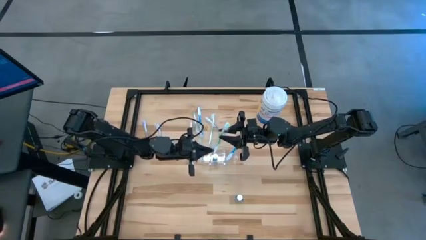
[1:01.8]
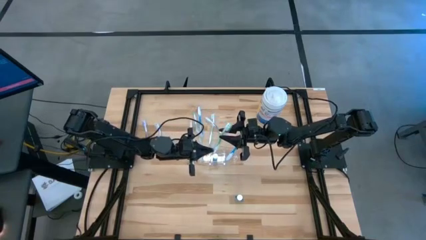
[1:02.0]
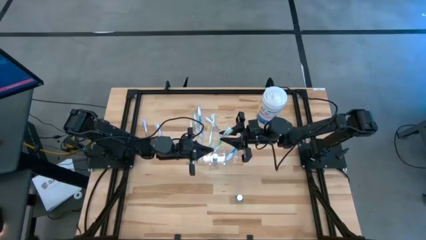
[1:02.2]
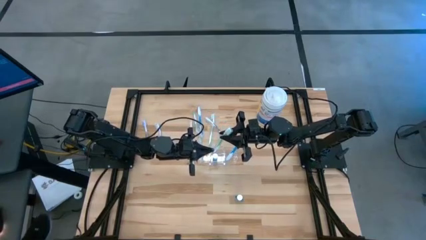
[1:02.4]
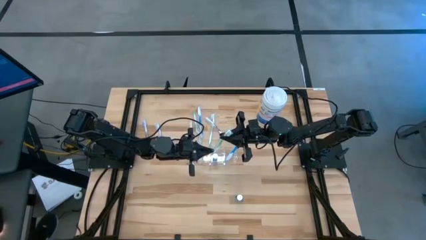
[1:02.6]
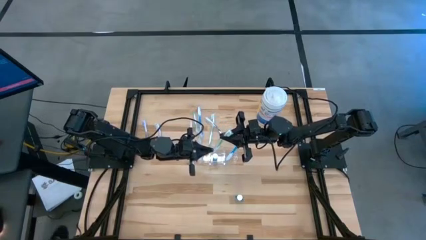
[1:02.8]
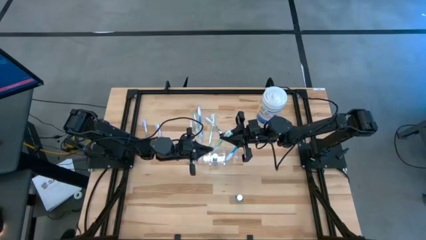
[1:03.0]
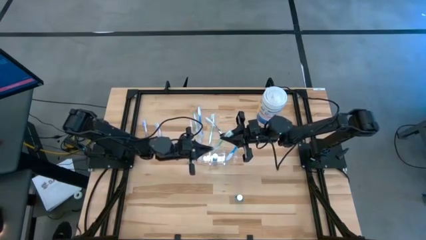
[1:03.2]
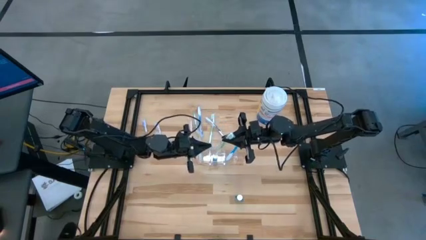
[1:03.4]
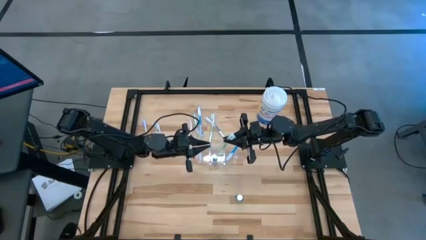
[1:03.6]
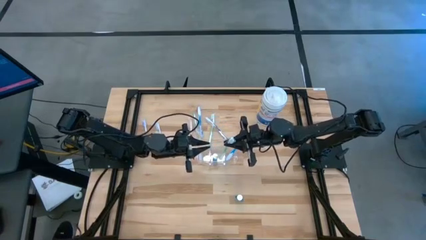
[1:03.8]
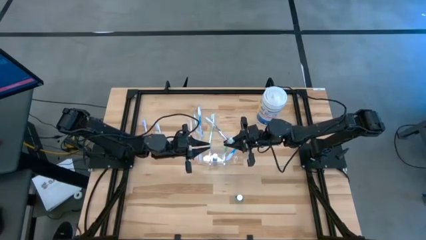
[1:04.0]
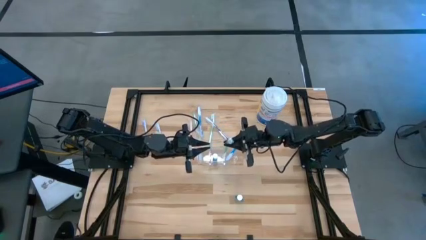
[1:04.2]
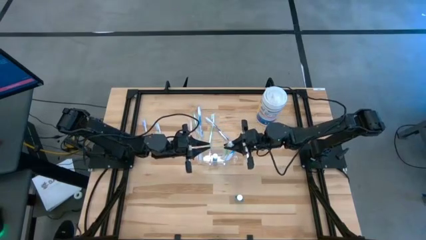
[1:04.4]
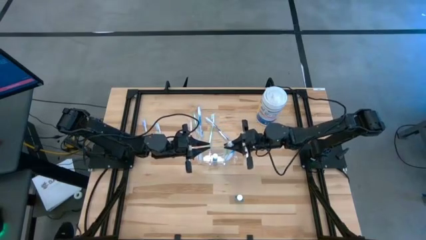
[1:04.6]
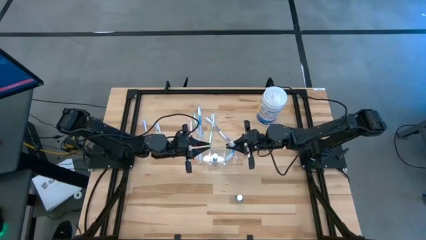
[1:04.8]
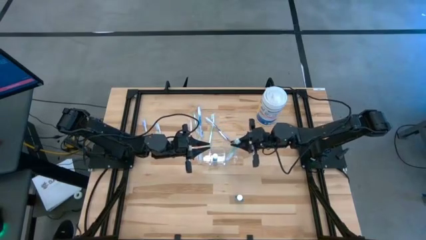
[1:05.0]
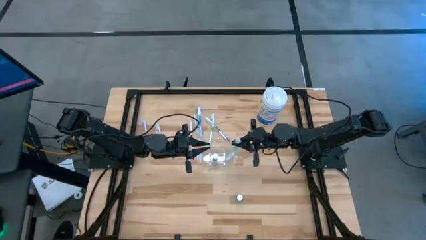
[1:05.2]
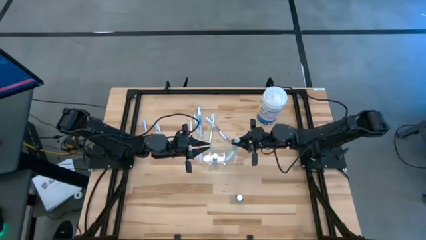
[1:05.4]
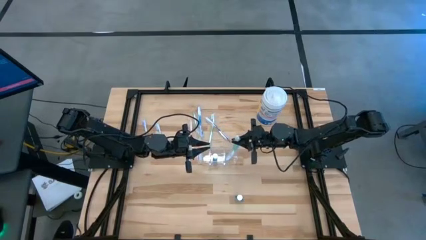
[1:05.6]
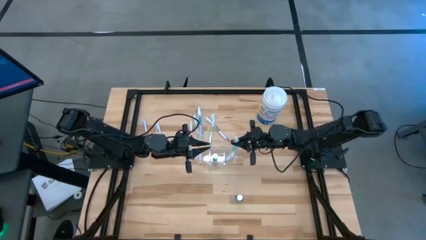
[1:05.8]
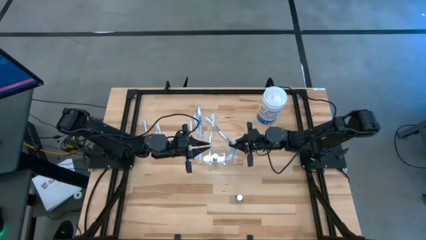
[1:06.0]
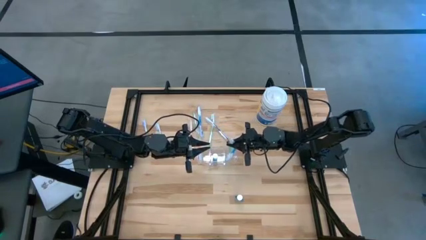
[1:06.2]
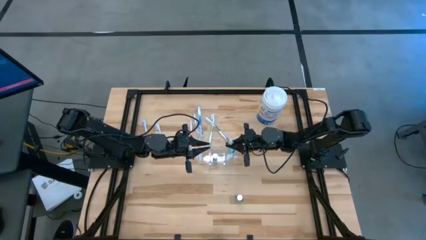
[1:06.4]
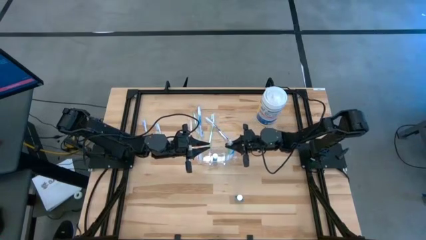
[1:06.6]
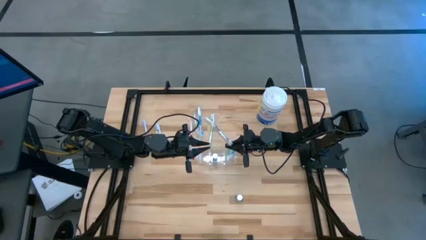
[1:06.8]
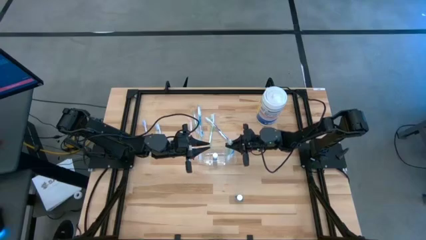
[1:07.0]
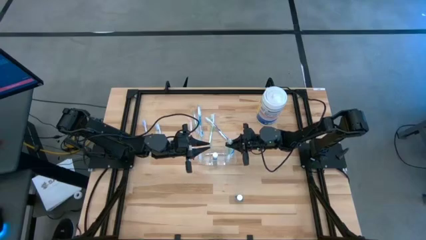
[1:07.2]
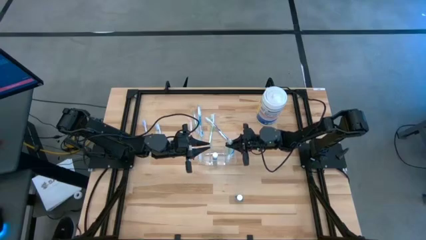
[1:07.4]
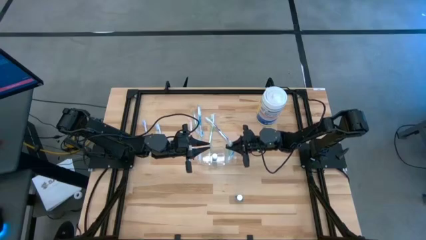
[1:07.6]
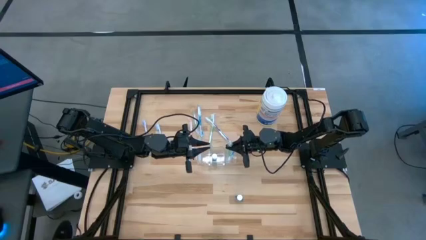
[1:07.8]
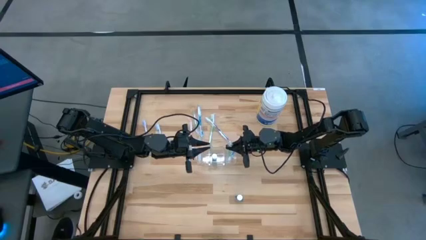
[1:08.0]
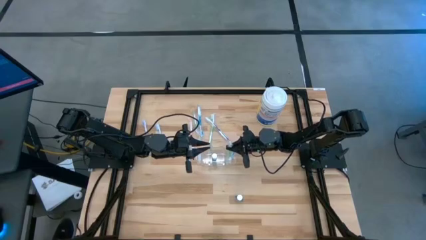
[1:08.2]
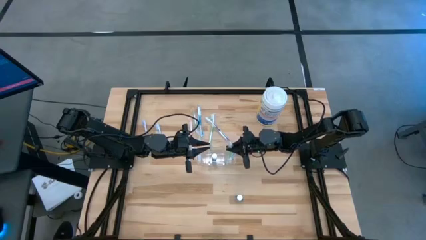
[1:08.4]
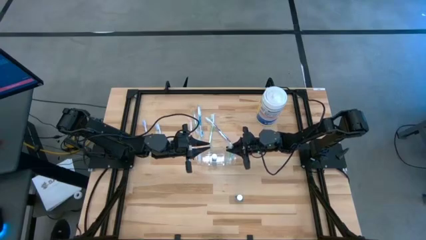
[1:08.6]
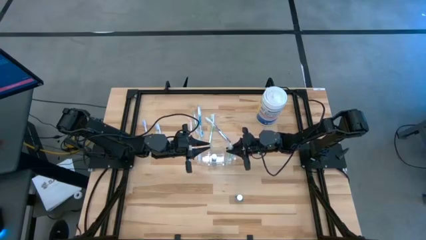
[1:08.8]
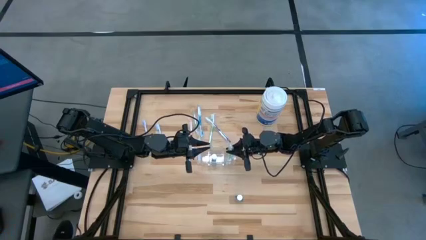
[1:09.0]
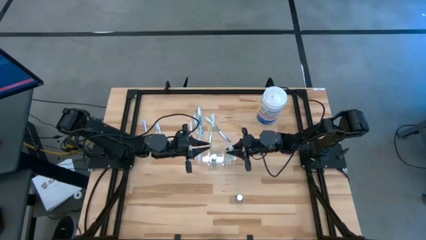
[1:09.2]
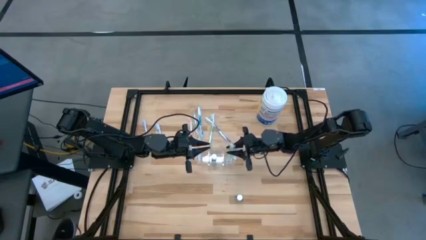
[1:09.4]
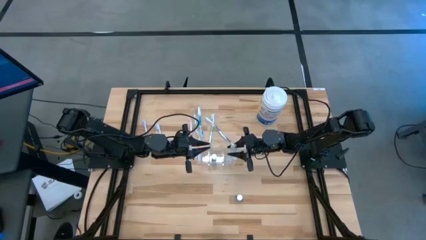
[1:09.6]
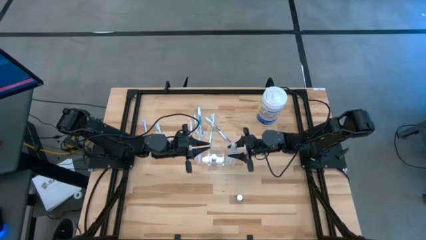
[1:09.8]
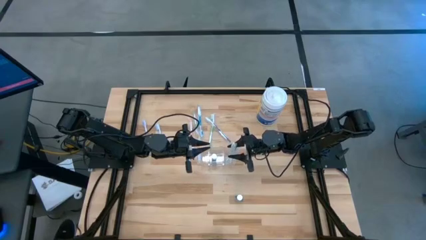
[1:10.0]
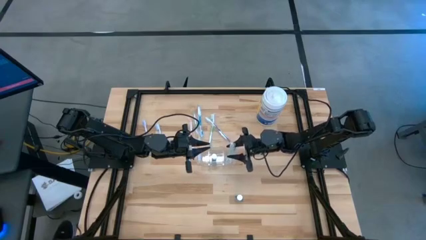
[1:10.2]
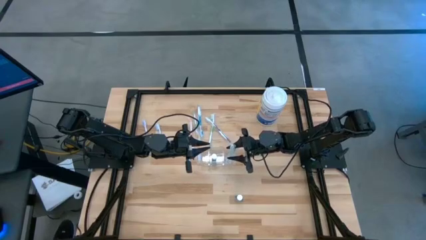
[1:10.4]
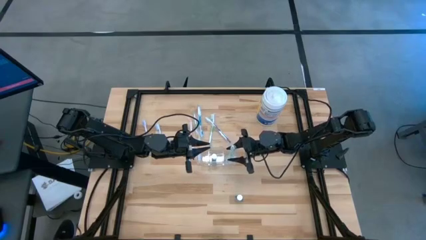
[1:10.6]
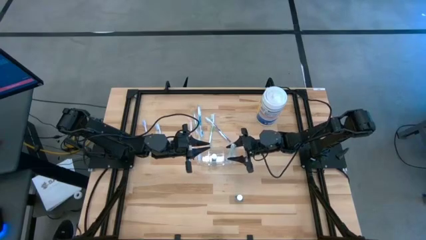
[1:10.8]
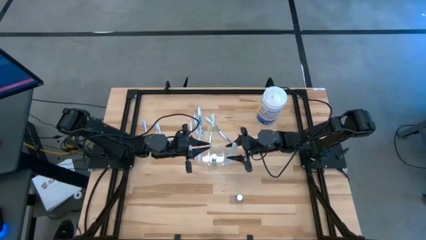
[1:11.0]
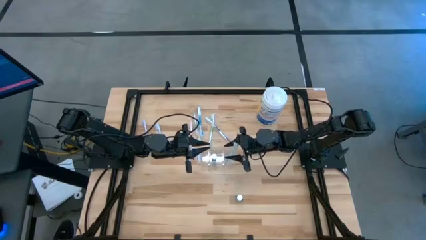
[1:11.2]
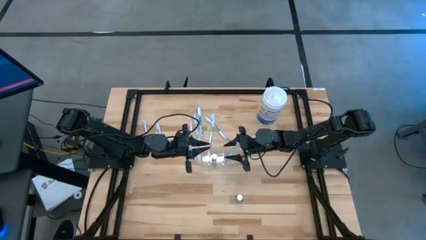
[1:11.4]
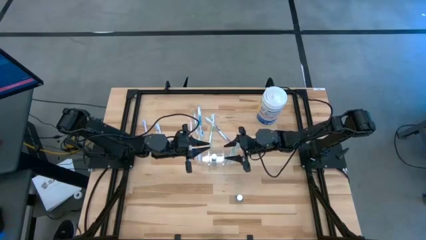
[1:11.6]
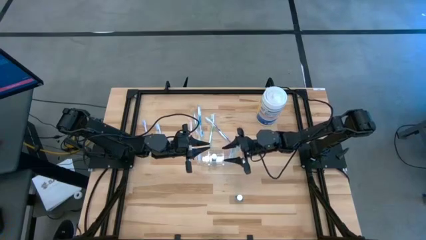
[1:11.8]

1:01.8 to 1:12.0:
Task: Pick & Place toothbrushing station
Put the left green toothbrush into the transparent organizer

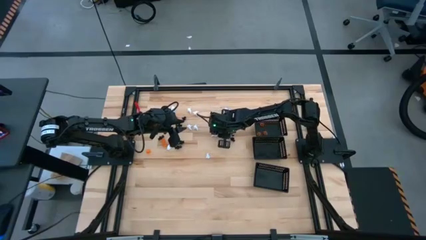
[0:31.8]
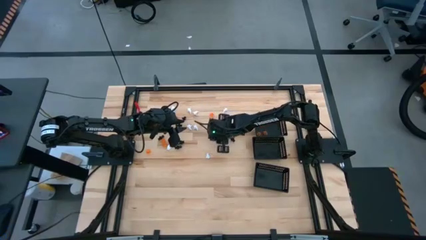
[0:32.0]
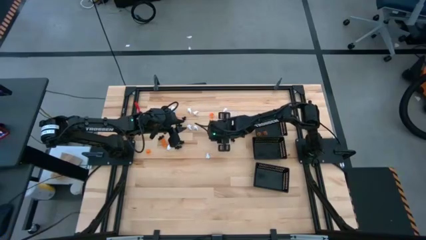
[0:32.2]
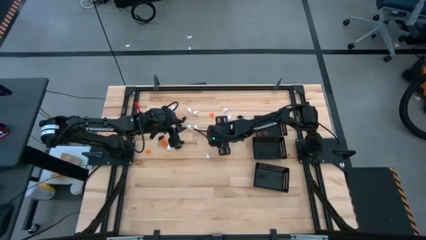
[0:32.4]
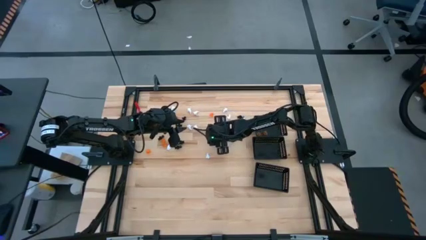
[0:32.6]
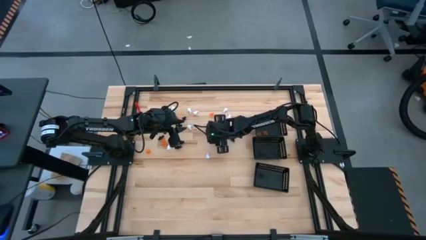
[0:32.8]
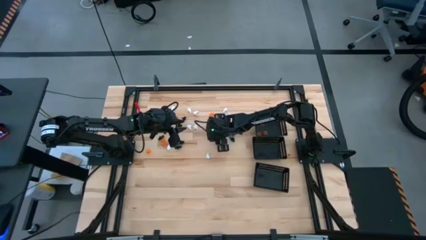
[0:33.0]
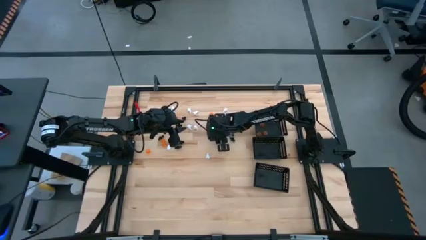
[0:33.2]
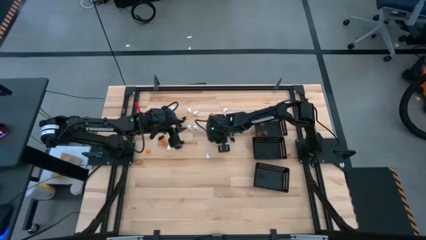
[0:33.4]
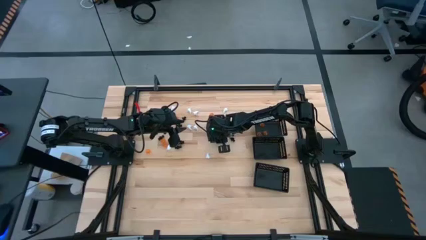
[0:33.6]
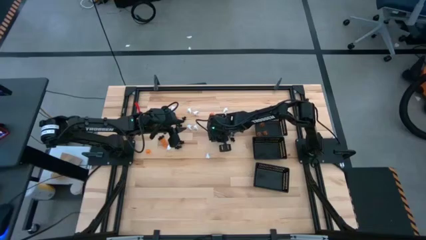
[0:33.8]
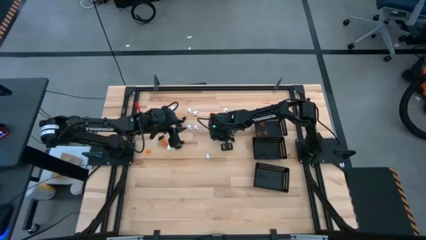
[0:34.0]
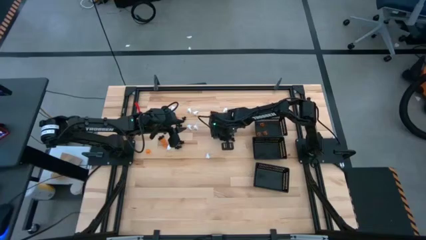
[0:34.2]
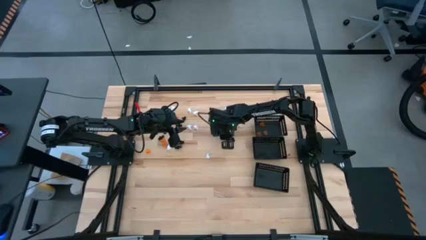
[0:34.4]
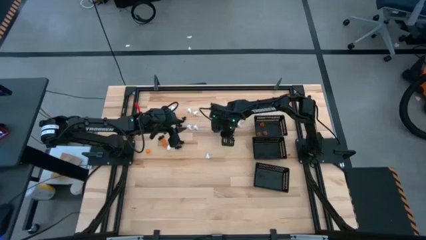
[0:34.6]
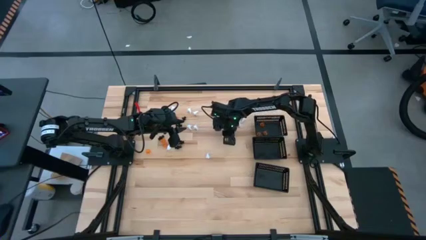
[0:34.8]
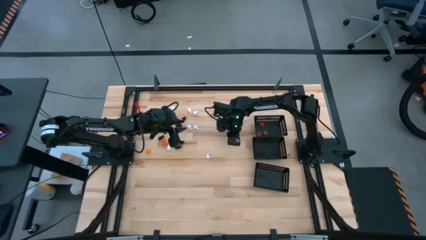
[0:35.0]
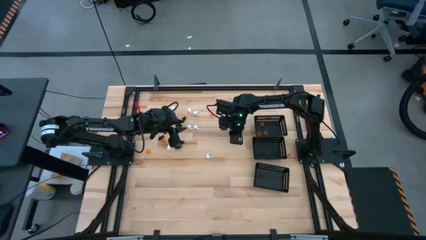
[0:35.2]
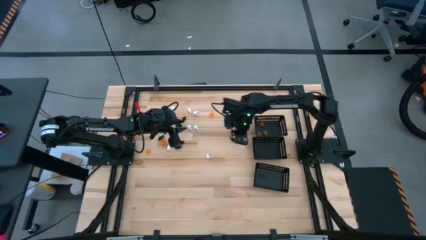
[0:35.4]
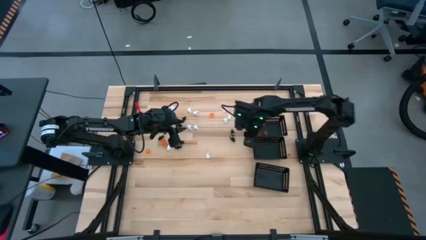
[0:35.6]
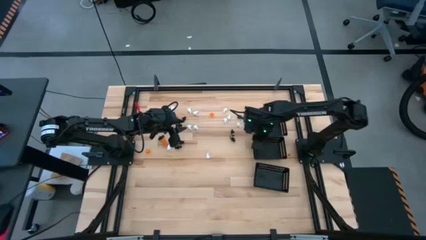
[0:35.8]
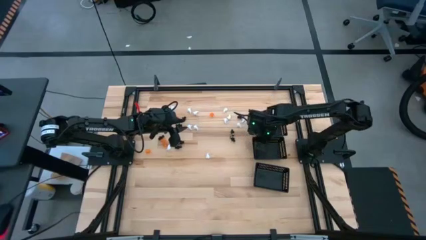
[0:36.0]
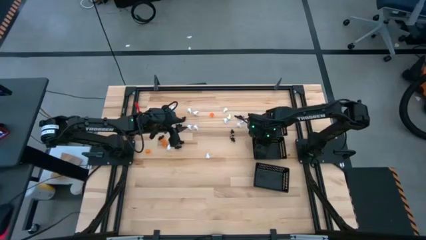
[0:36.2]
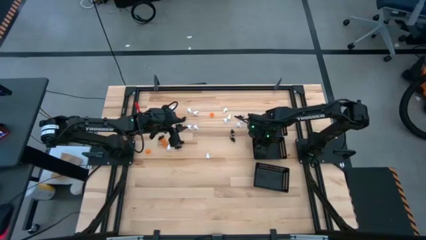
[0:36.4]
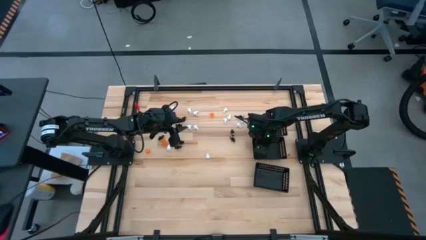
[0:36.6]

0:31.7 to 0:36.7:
Task: Sort Halloween decoration
Put the white ghost toy into the center black bin

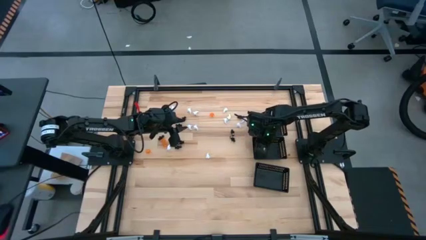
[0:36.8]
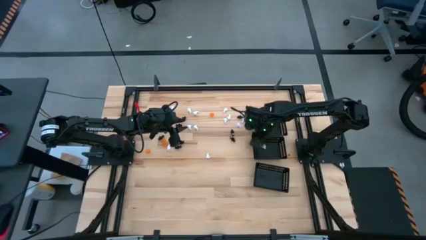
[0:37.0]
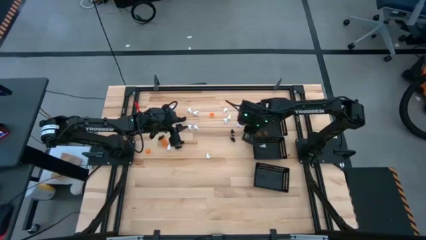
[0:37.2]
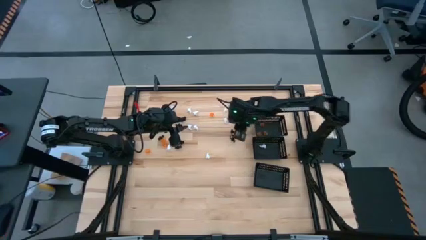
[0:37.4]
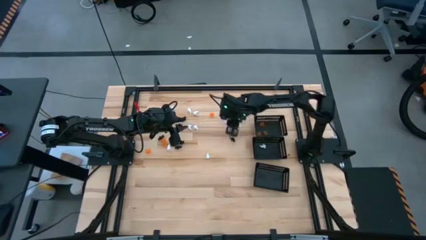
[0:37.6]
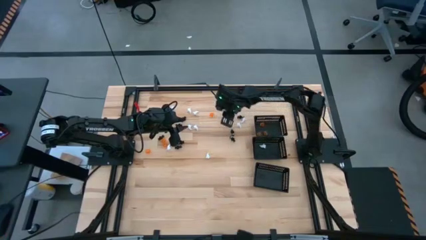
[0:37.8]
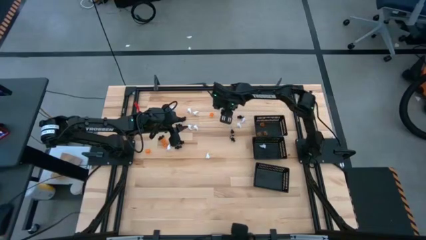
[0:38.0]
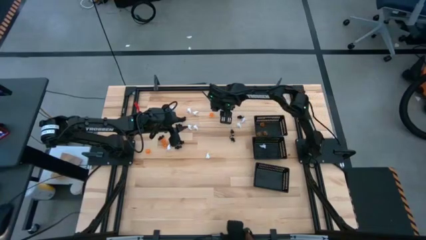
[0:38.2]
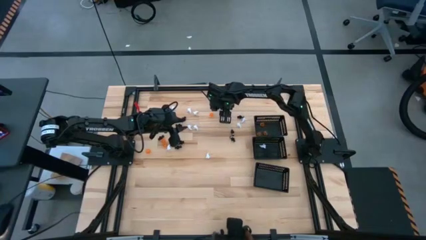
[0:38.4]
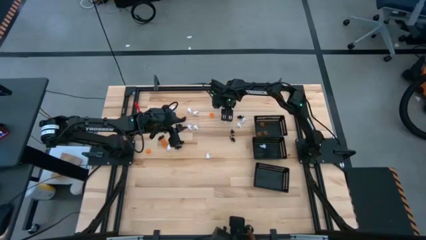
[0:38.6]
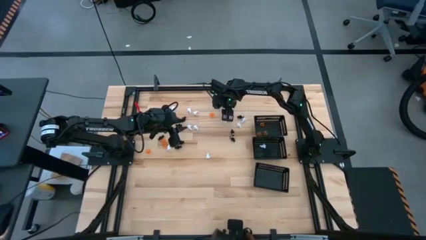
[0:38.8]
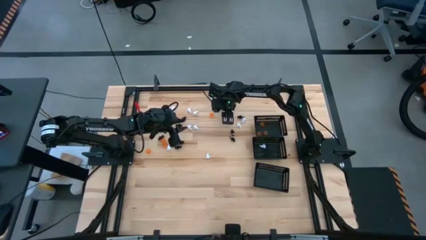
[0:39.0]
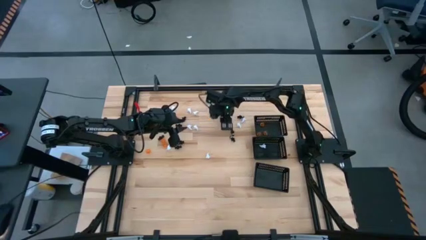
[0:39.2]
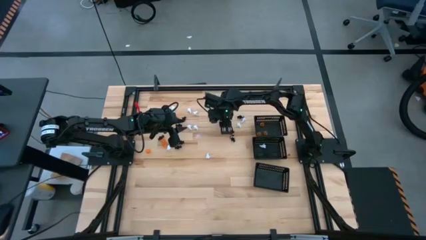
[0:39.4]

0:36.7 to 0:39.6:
Put the white ghost toy into the center black bin
